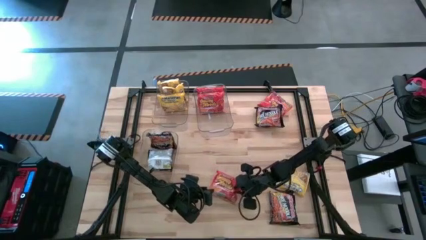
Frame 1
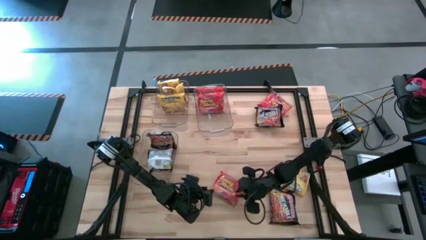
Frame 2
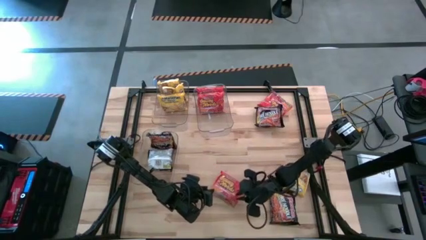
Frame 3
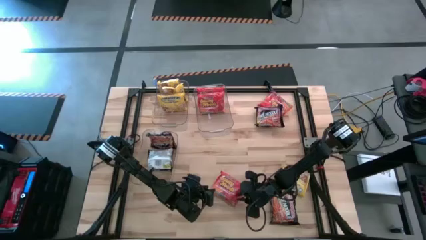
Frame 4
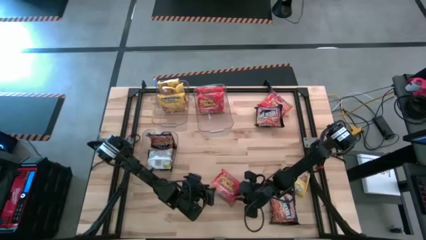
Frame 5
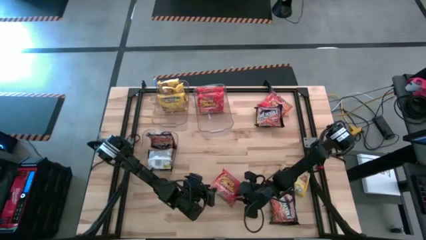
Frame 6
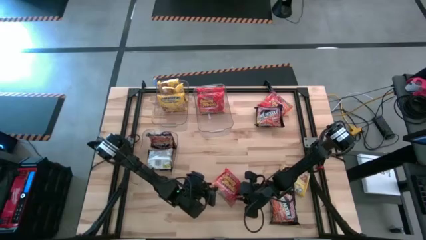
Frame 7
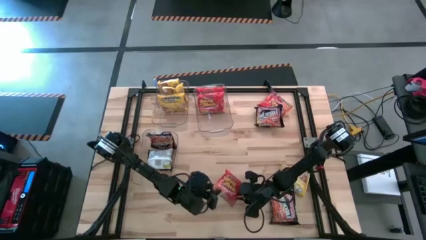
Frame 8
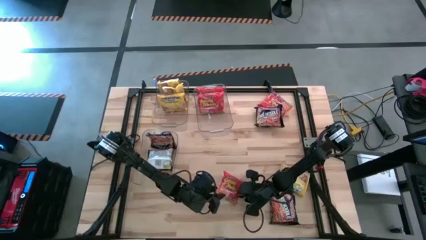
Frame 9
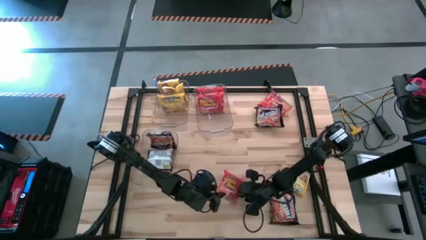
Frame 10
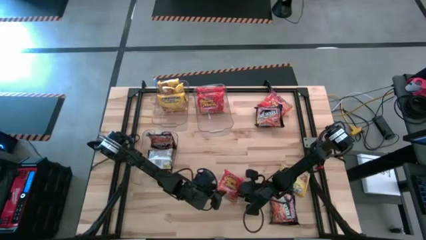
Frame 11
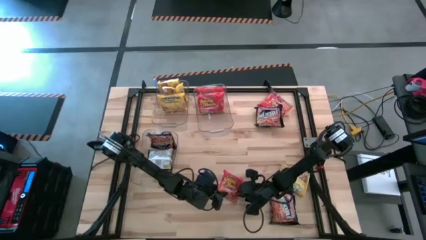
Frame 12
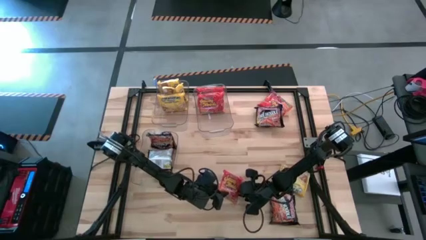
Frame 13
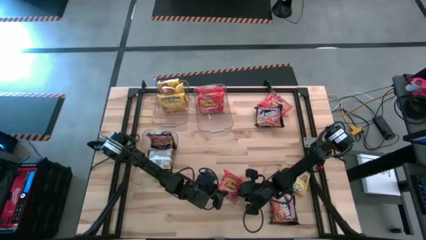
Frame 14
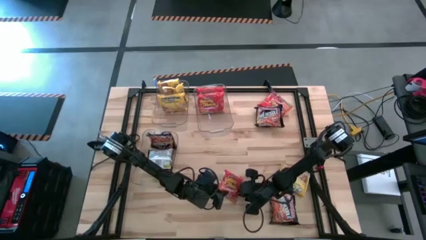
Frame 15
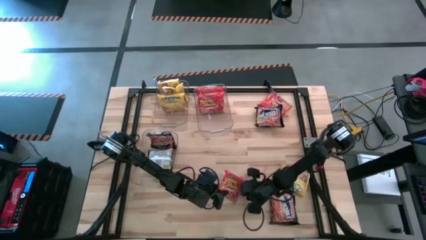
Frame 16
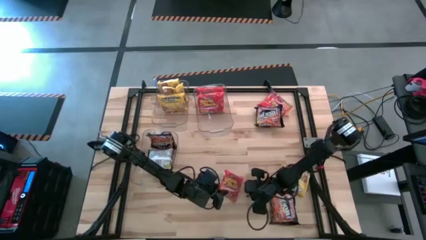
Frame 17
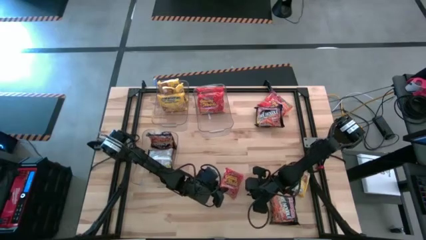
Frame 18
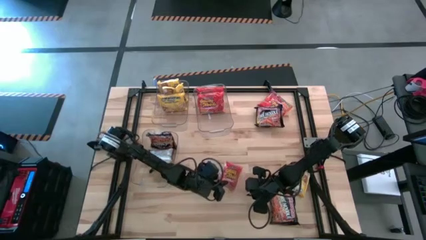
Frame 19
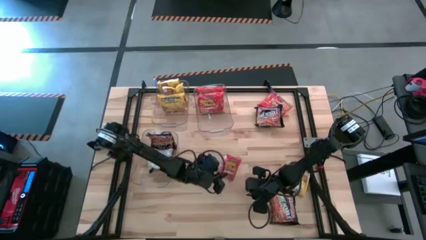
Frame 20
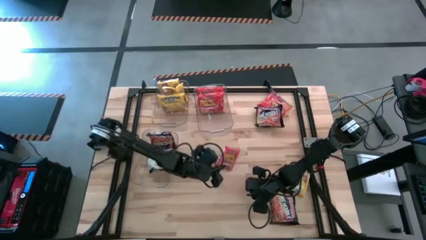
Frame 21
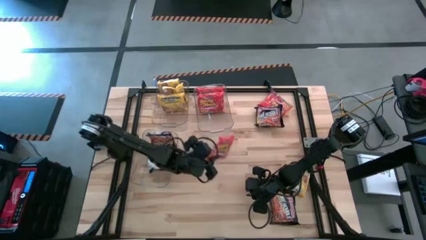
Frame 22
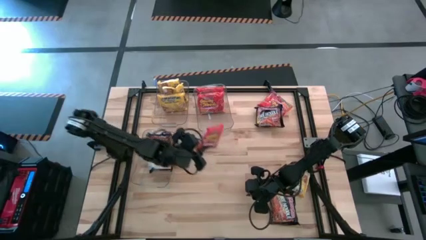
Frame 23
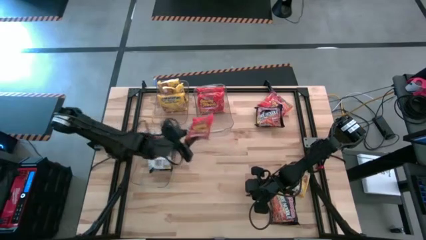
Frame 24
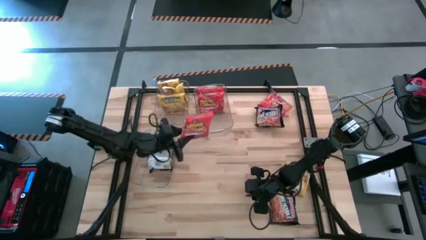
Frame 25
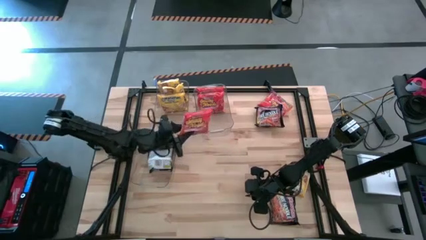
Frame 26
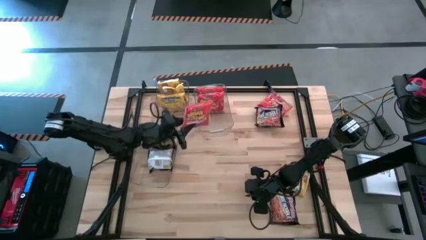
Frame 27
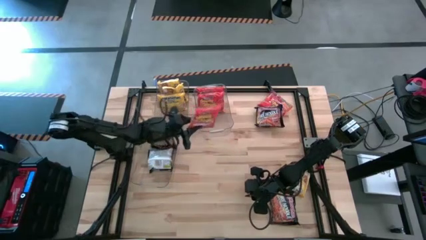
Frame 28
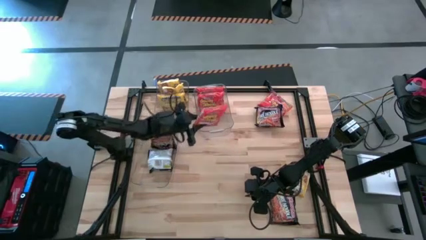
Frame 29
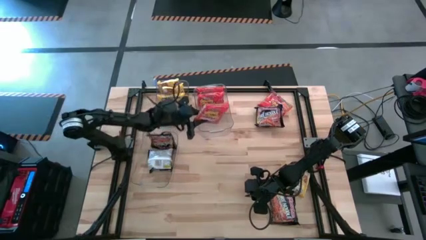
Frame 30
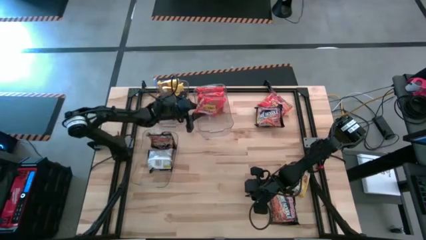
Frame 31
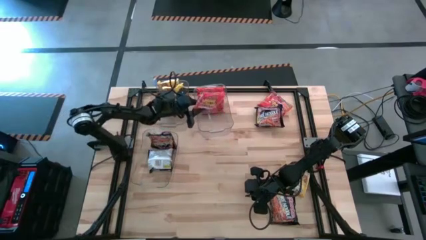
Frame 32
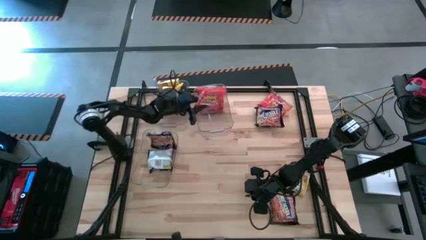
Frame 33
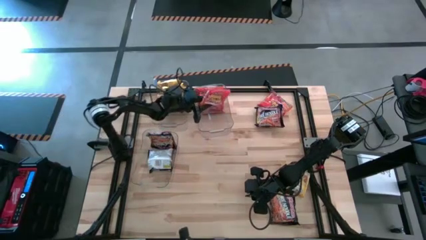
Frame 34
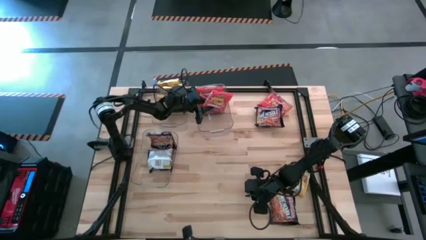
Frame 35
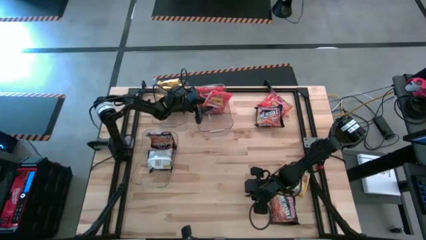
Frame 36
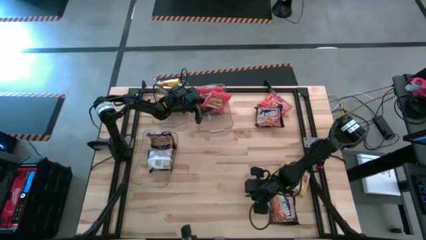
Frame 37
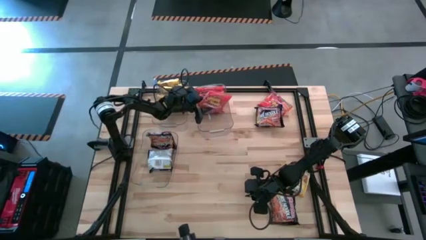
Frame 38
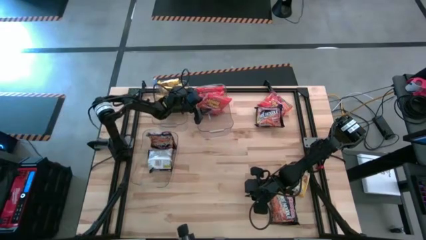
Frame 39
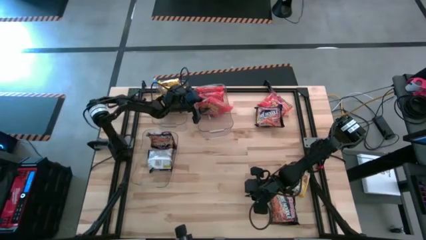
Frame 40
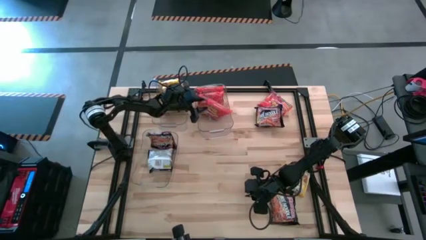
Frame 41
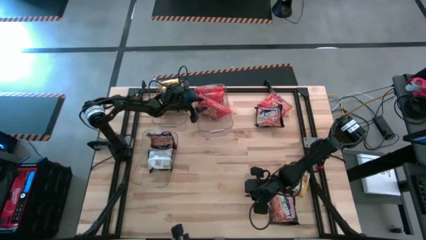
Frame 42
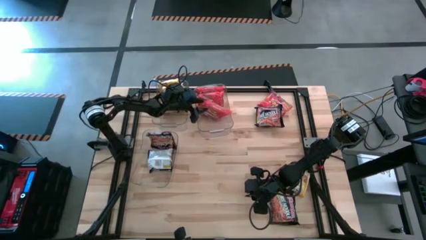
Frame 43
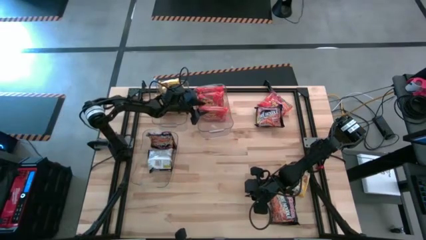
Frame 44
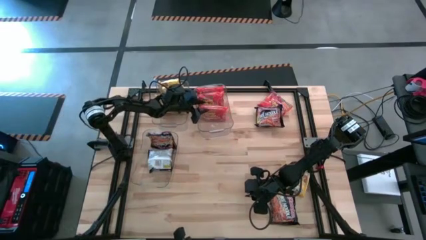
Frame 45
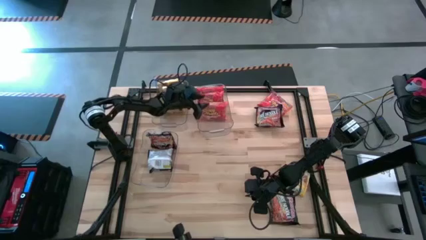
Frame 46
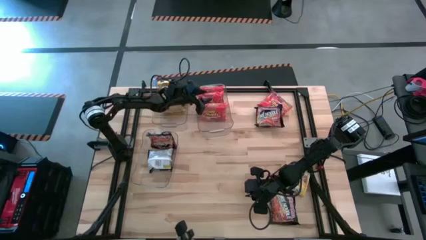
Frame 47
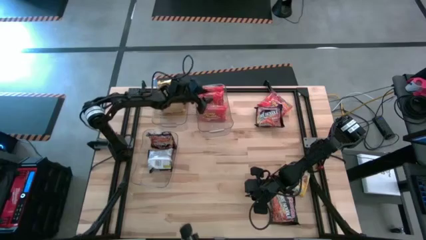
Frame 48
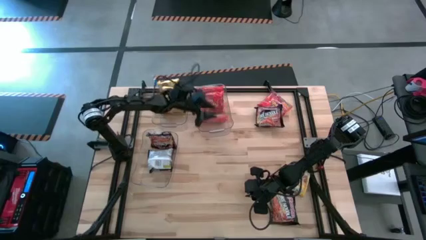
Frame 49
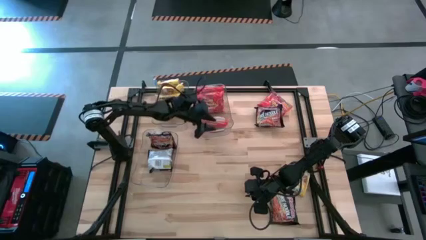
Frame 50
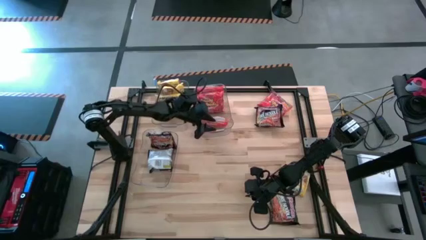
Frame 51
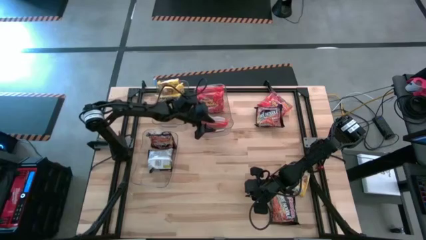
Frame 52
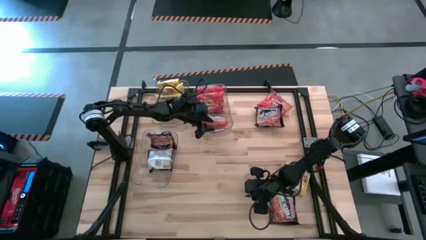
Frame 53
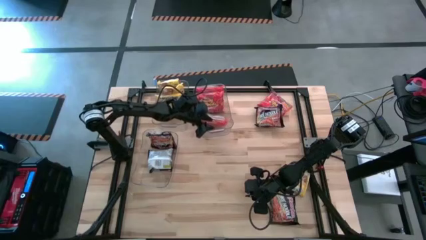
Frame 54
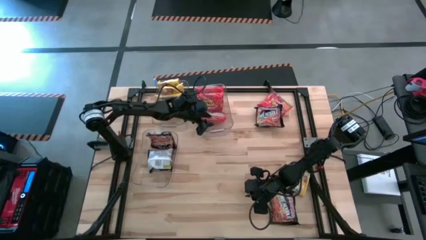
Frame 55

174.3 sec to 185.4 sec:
Task: Sort Maruchan noodles
Put the orange noodle pack into the top right transparent bin

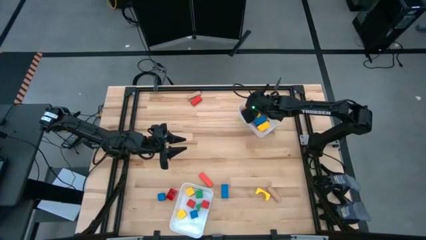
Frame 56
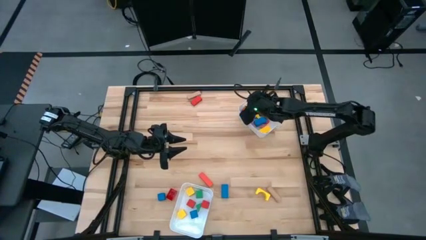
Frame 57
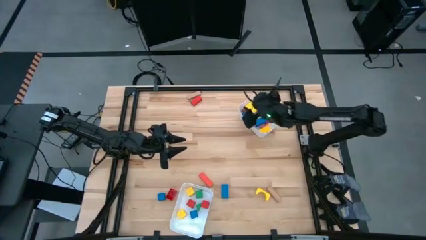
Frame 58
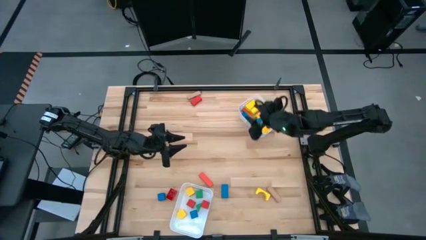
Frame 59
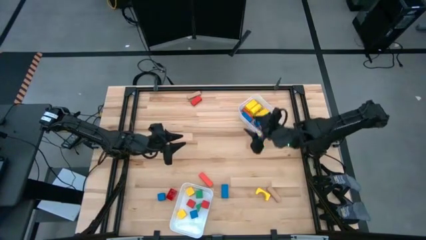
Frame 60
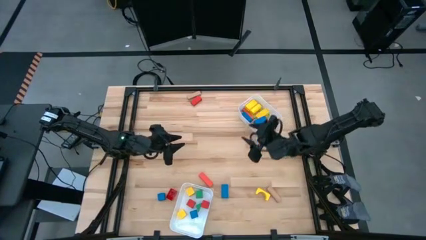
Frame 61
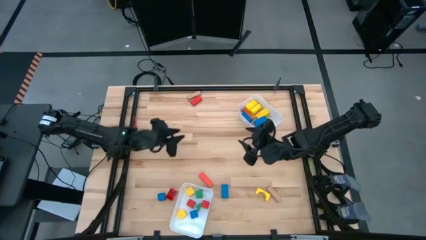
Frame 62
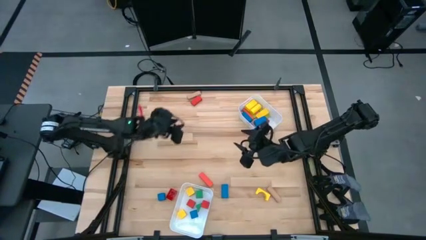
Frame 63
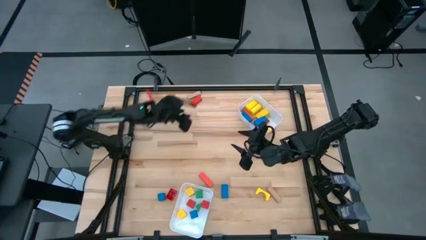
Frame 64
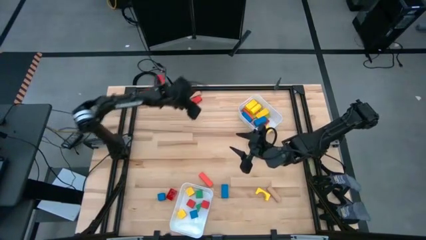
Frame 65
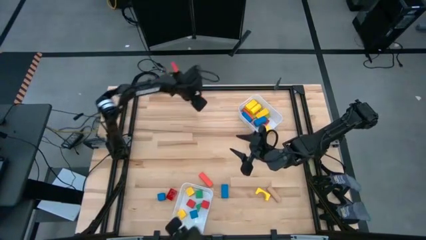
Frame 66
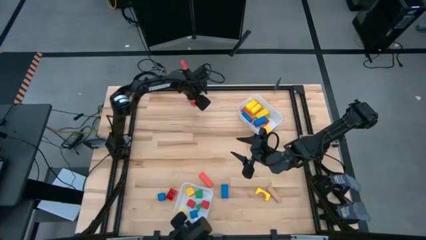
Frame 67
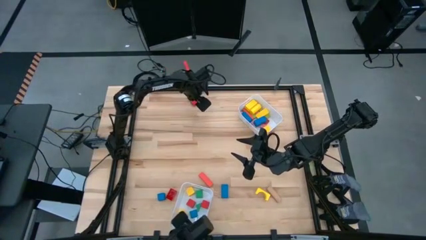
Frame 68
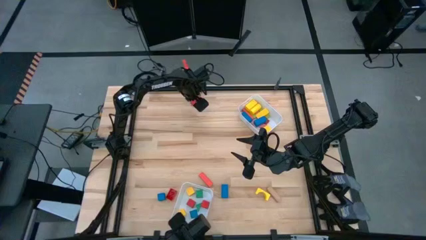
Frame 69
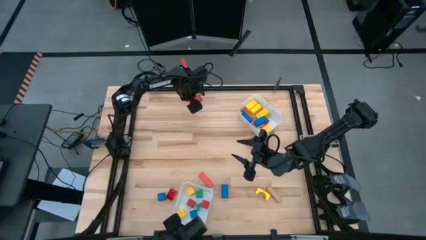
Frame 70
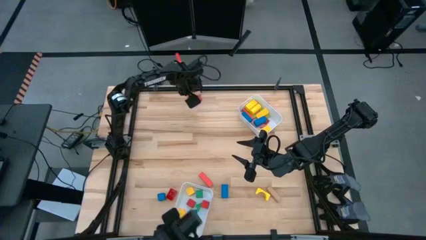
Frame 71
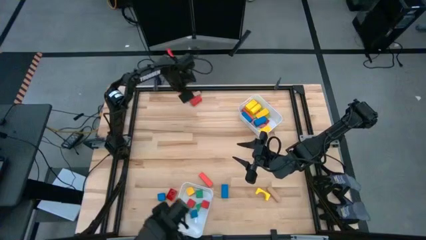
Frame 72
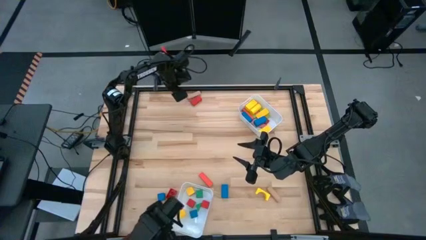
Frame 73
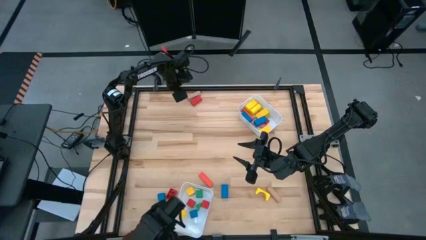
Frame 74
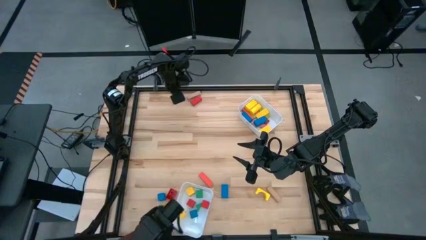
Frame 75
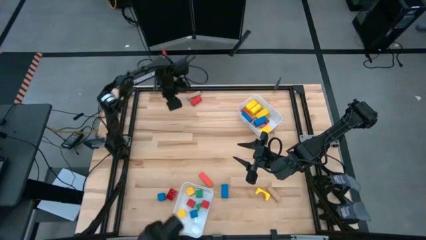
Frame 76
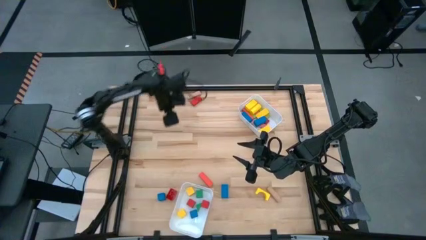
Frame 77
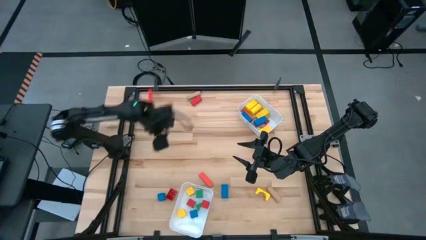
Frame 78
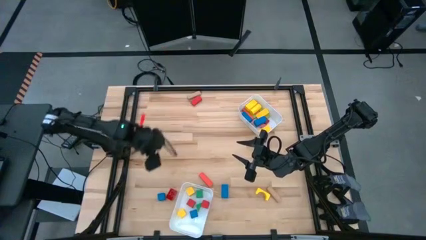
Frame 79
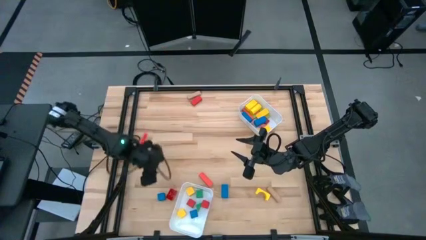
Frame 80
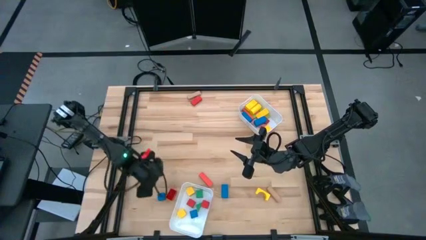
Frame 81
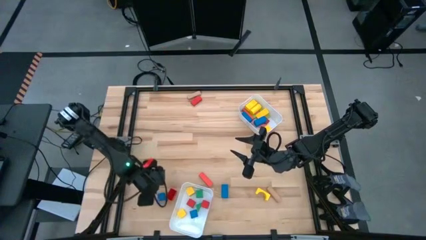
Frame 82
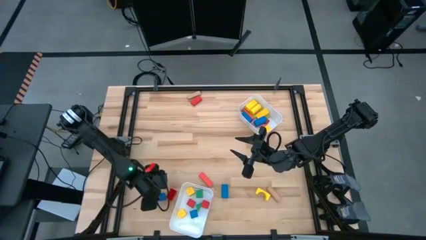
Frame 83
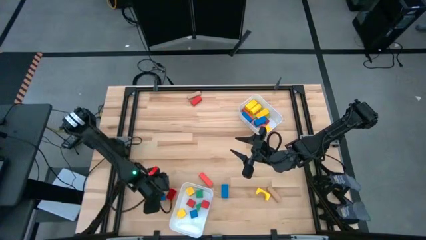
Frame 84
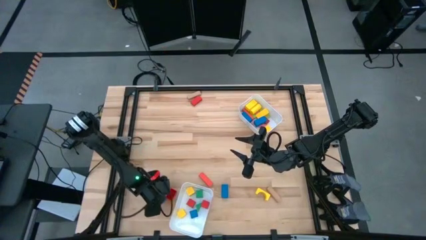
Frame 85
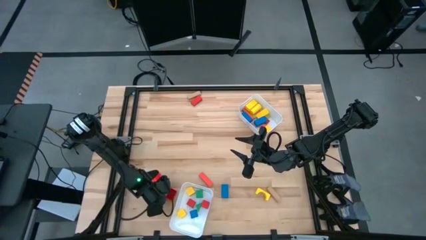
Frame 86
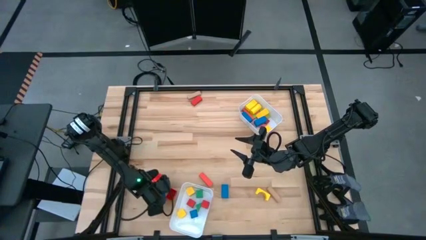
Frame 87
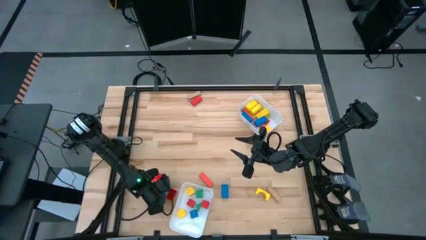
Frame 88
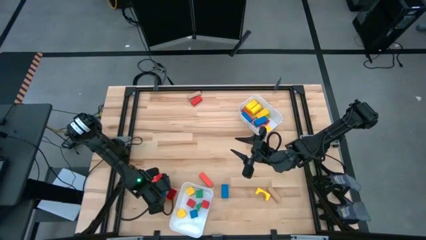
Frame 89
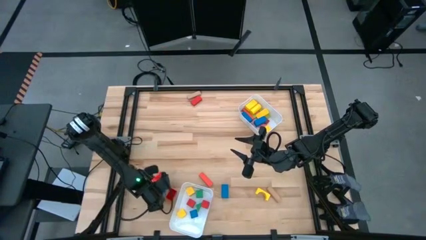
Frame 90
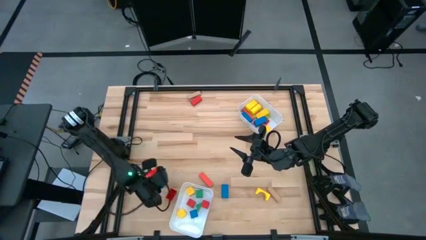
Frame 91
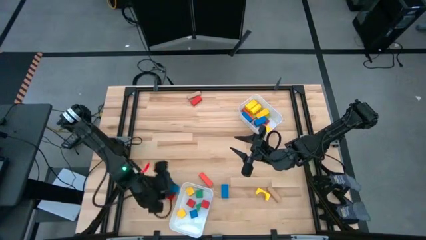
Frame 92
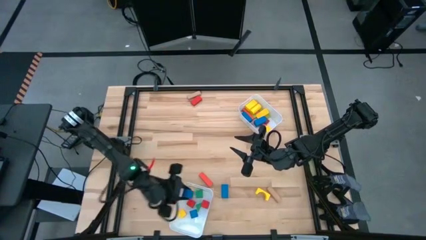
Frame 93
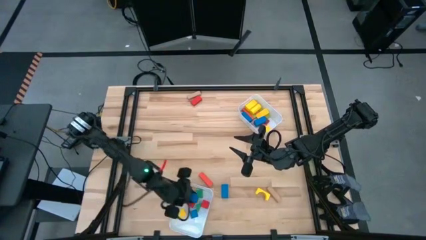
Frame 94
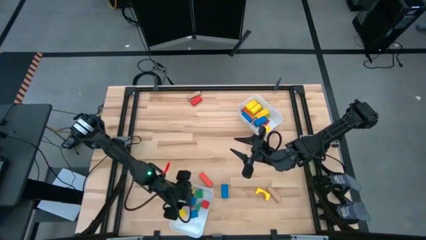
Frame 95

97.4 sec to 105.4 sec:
Task: Sort blocks by size
Put the blue square block into the bottom white bin
